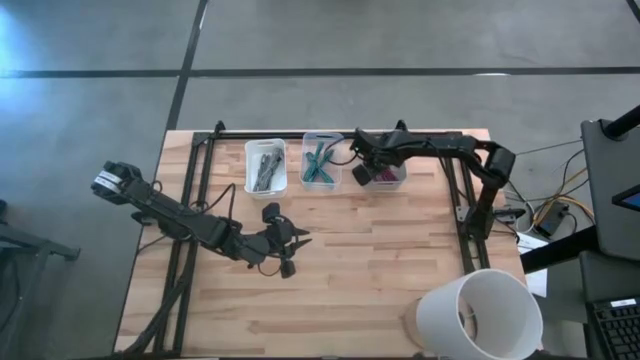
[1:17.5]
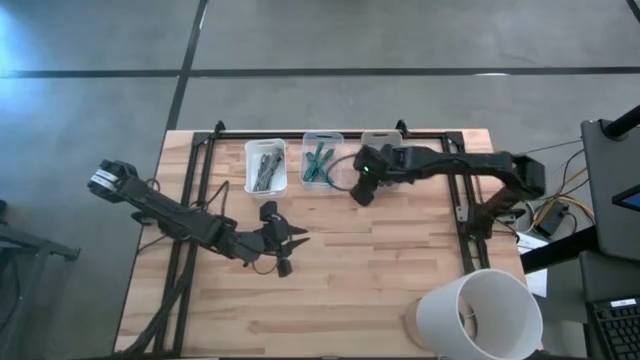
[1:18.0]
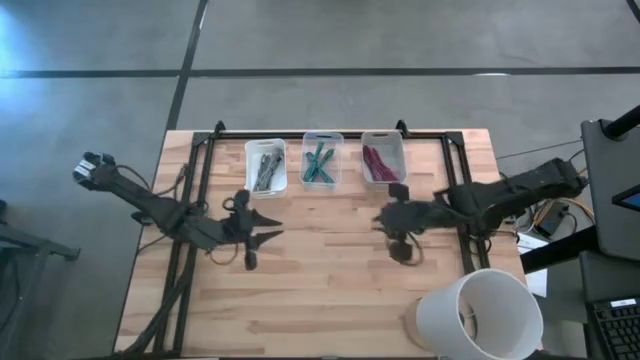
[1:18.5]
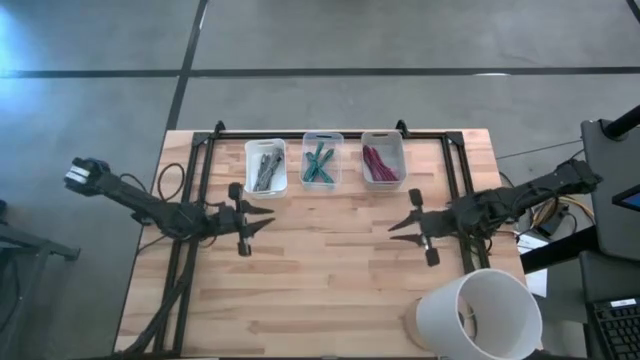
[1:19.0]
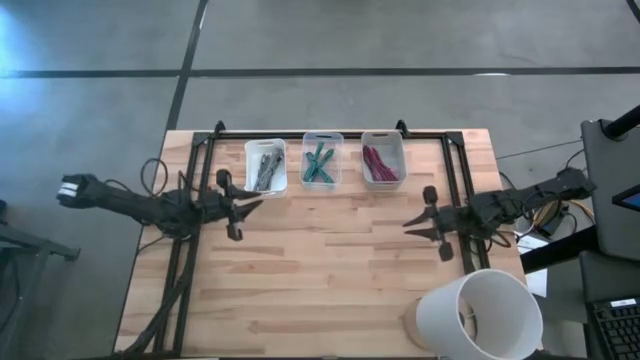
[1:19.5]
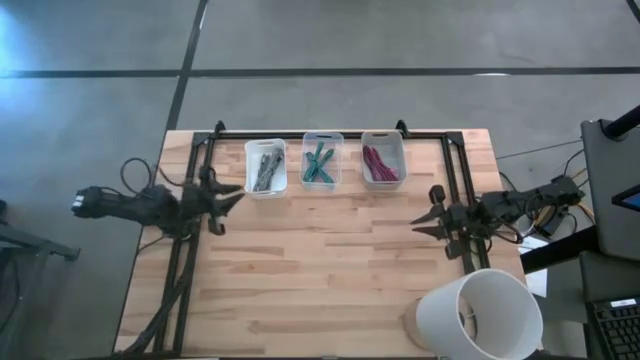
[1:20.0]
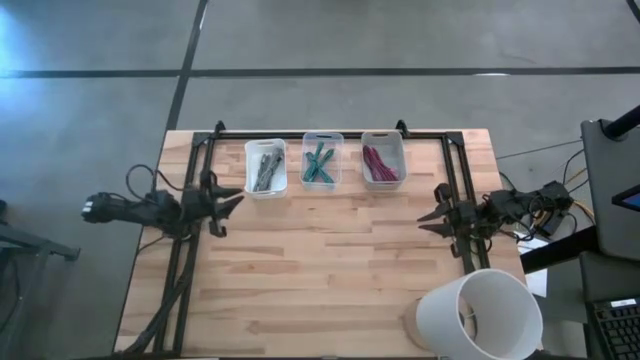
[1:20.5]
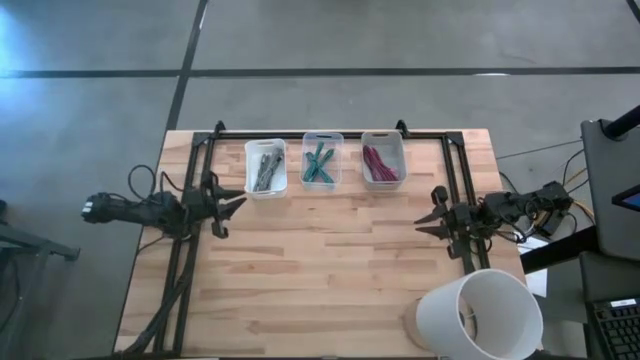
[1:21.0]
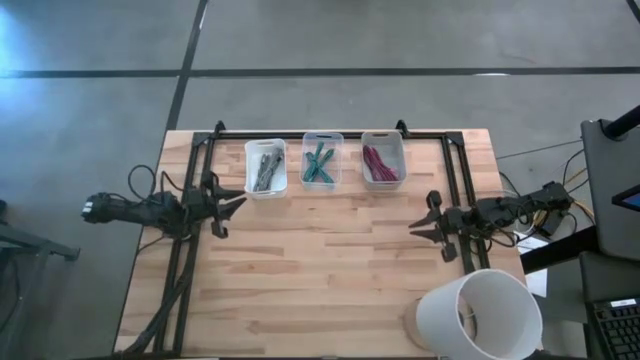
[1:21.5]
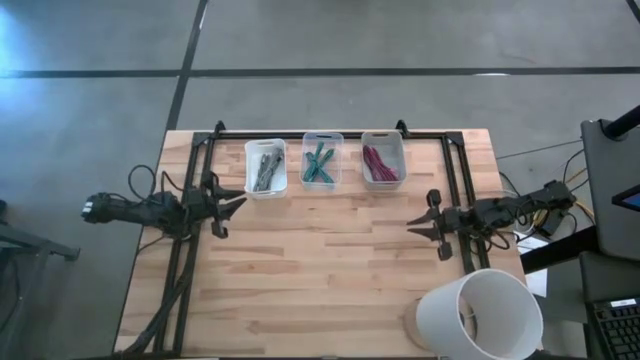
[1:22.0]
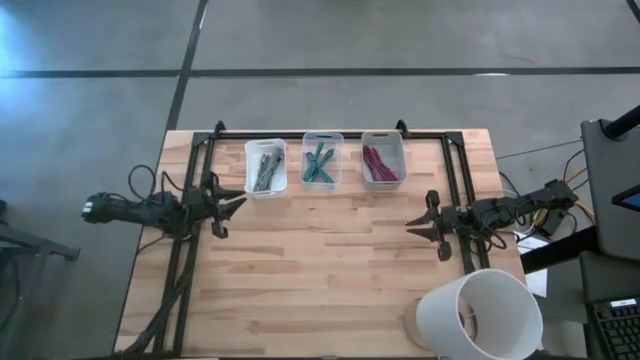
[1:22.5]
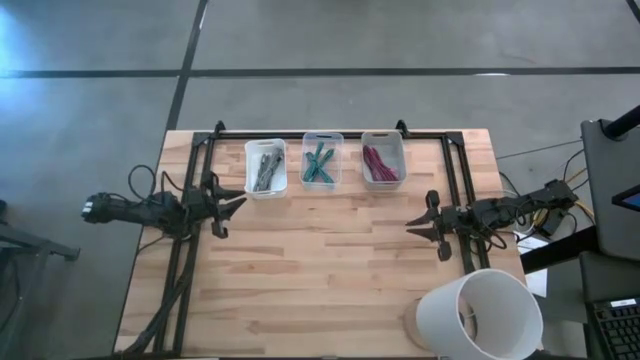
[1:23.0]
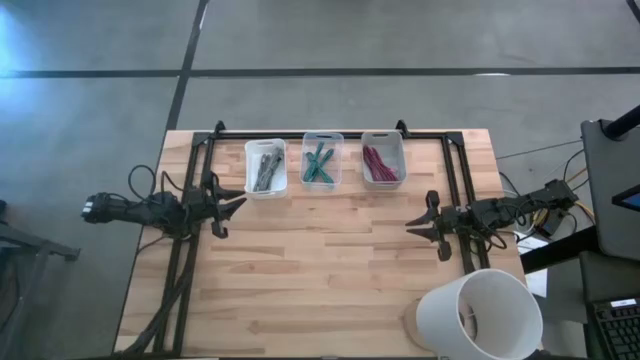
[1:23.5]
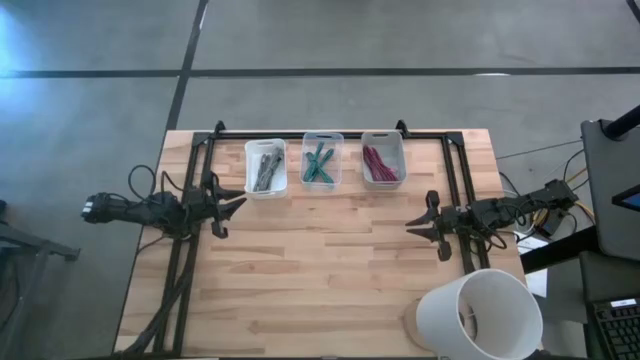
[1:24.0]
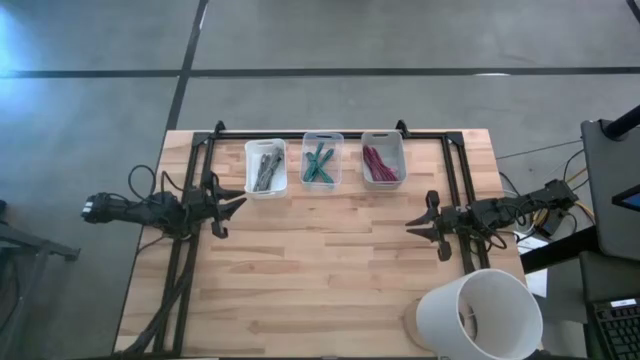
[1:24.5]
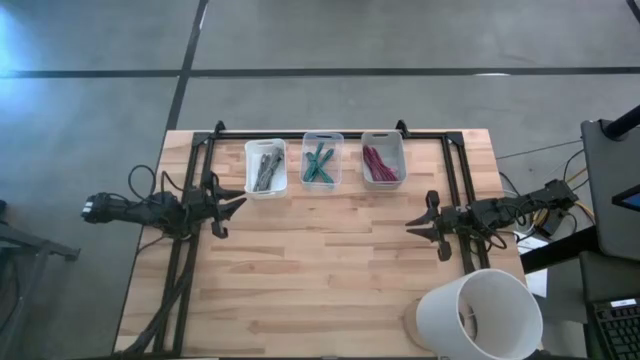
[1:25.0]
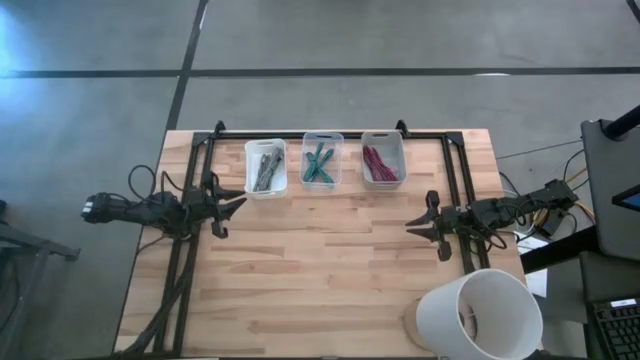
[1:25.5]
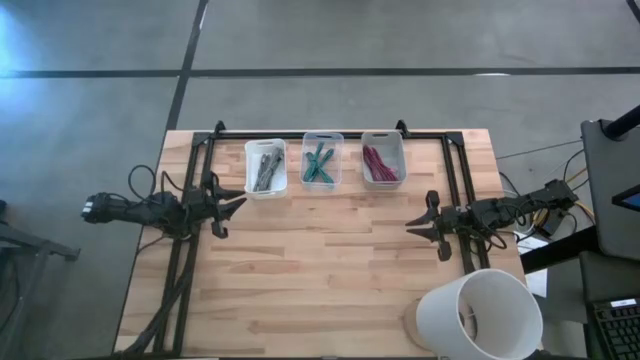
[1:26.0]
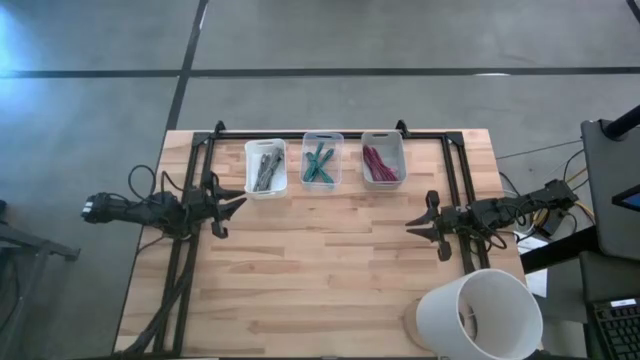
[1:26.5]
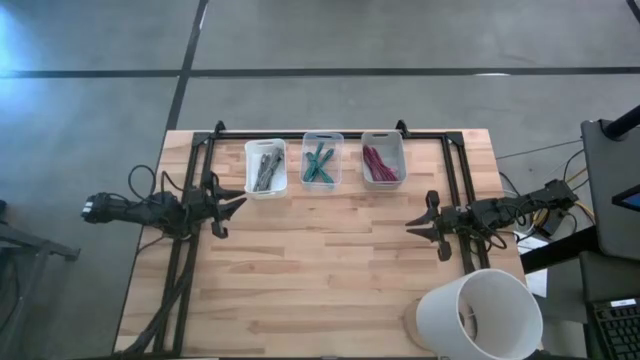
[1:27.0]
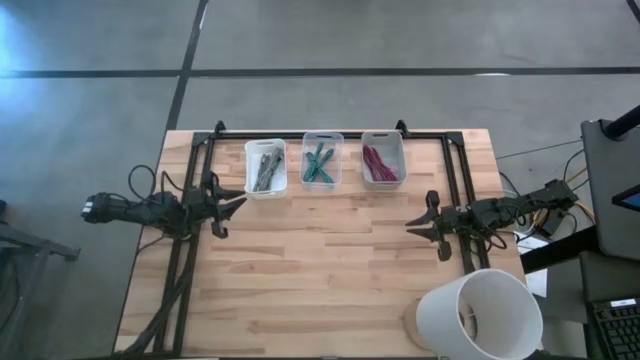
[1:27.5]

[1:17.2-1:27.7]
Task: Pick & Place USB Port
Return to Home Position

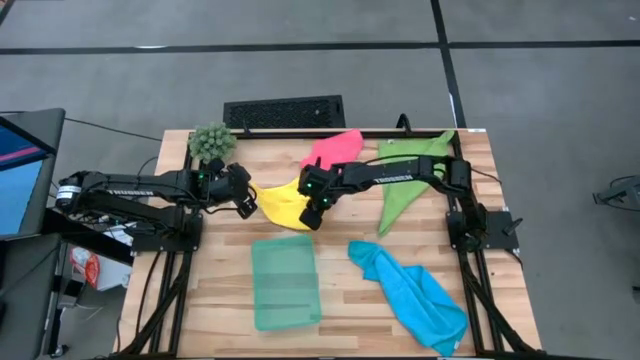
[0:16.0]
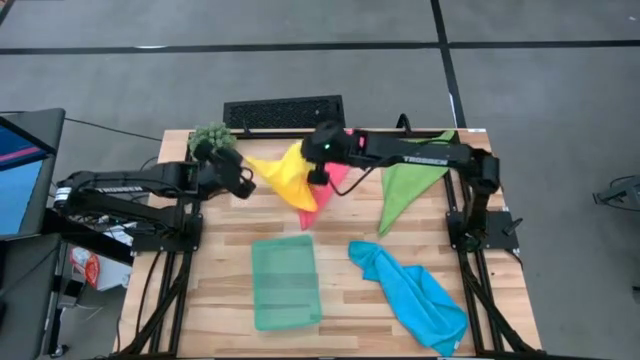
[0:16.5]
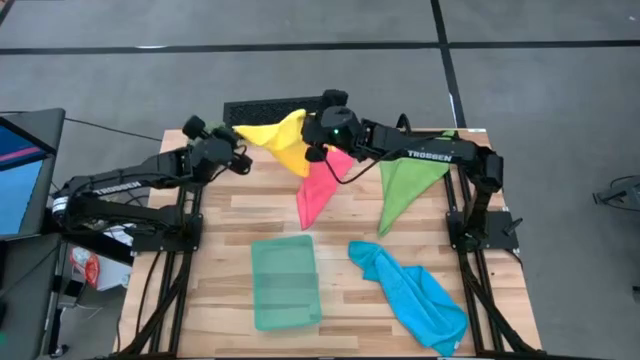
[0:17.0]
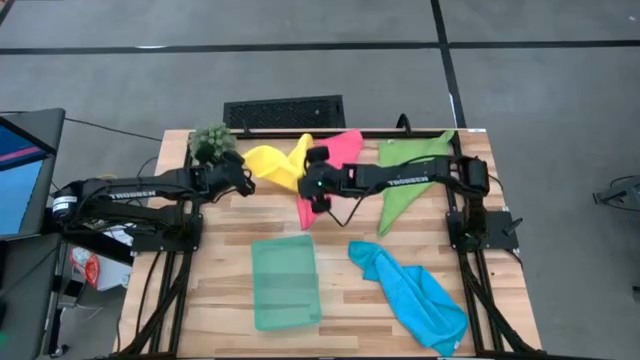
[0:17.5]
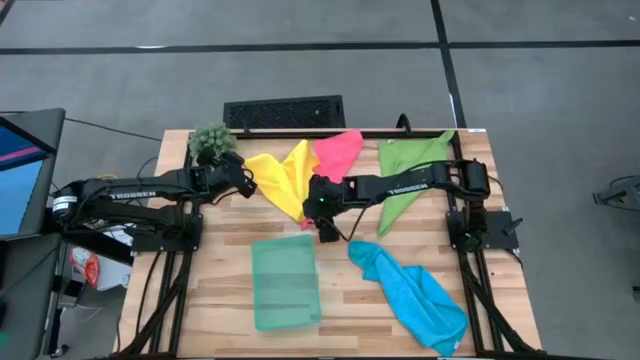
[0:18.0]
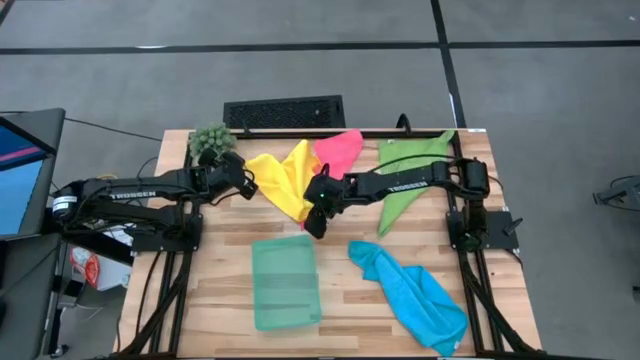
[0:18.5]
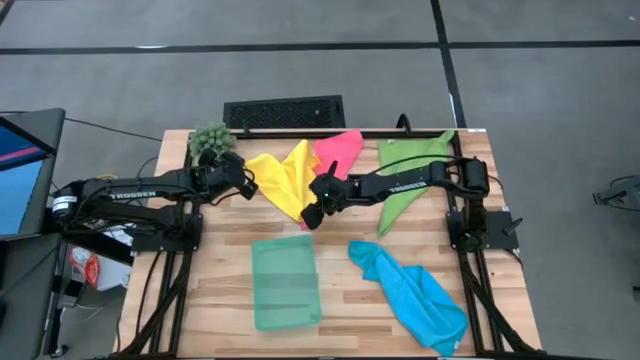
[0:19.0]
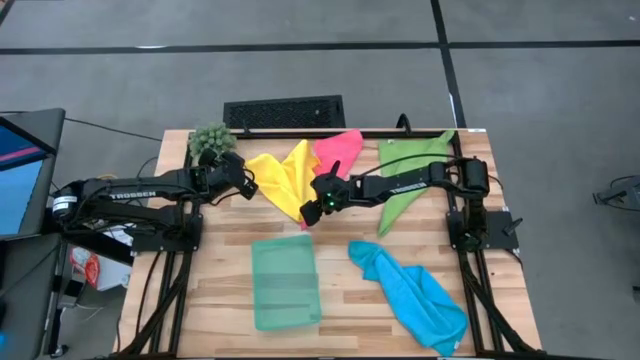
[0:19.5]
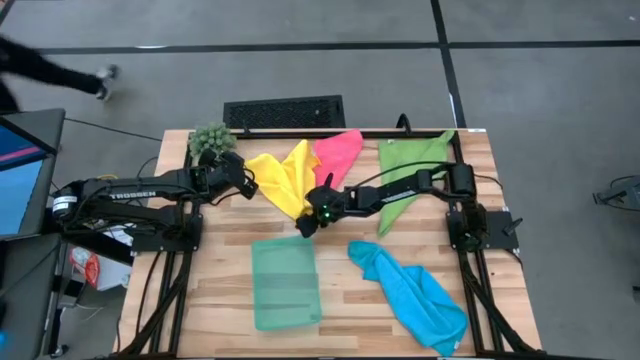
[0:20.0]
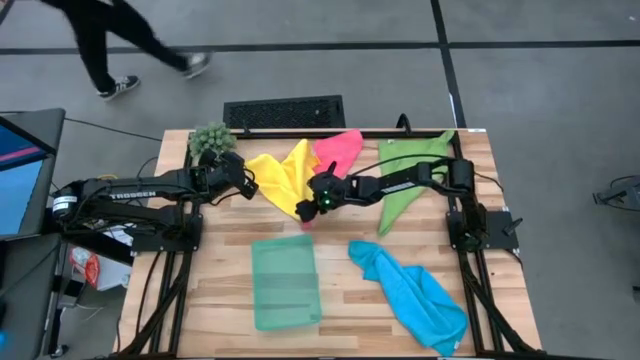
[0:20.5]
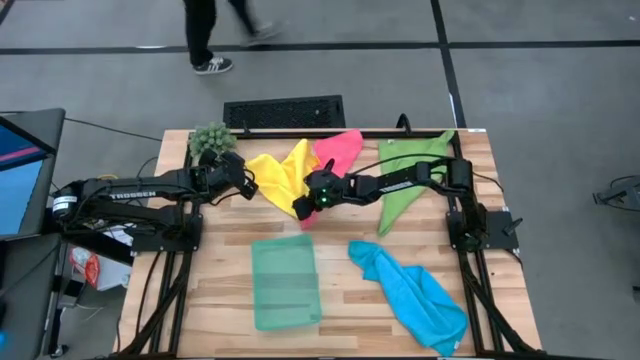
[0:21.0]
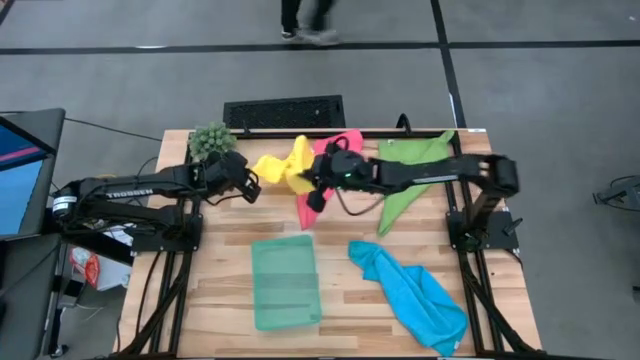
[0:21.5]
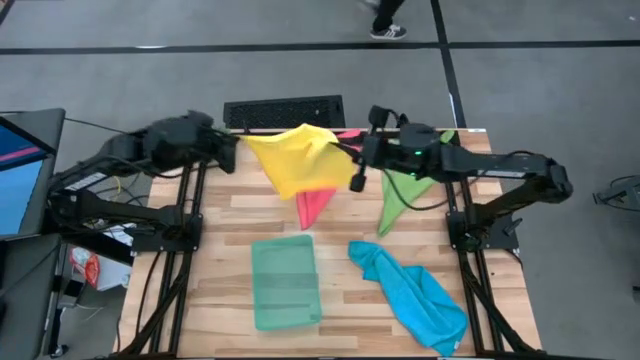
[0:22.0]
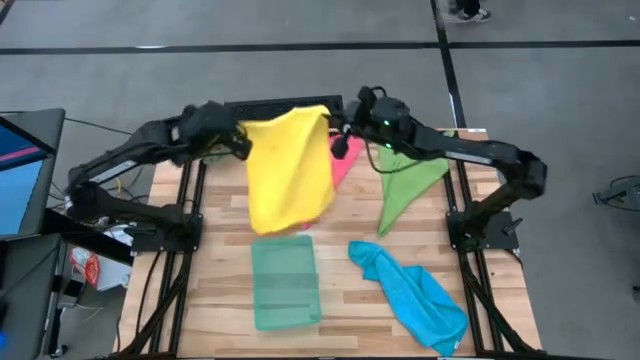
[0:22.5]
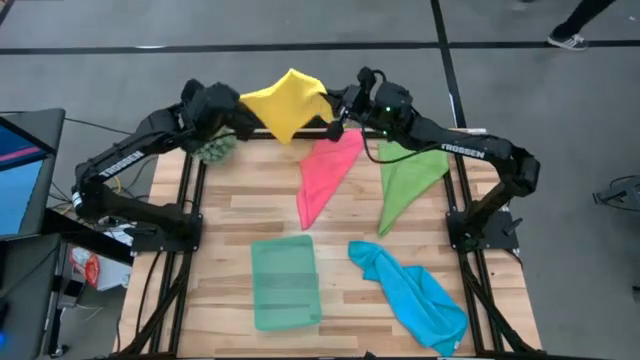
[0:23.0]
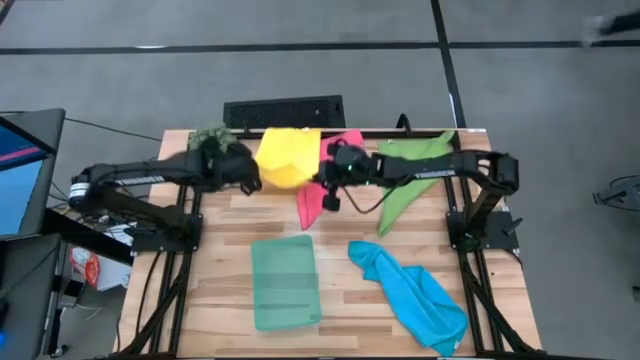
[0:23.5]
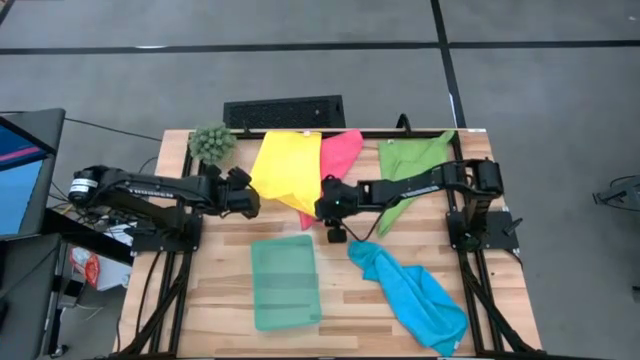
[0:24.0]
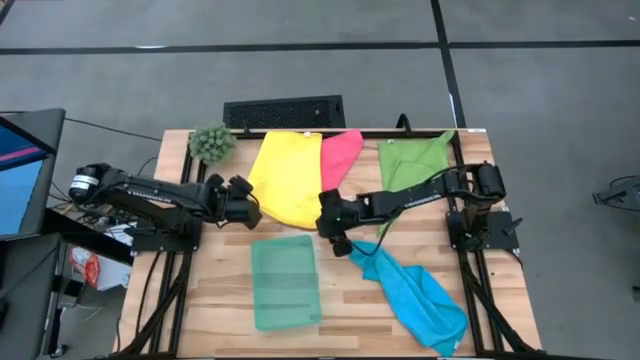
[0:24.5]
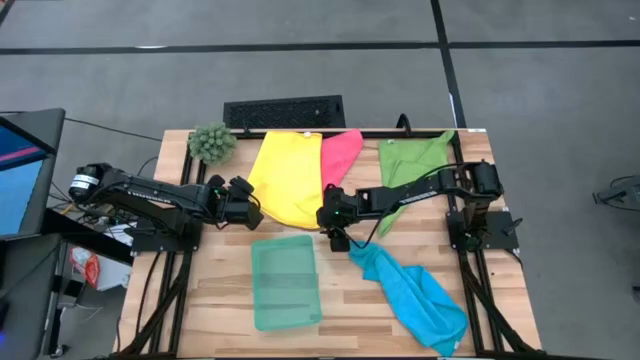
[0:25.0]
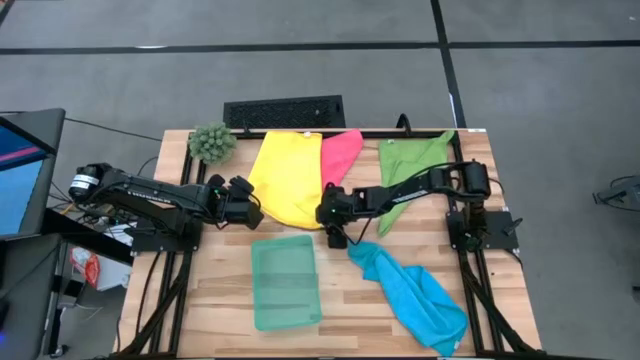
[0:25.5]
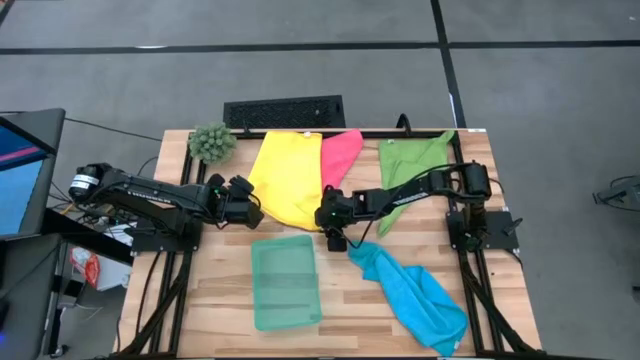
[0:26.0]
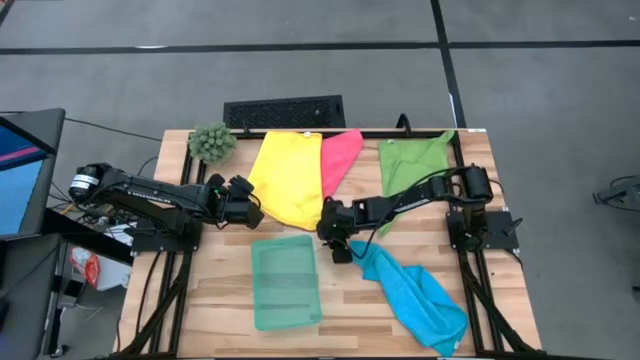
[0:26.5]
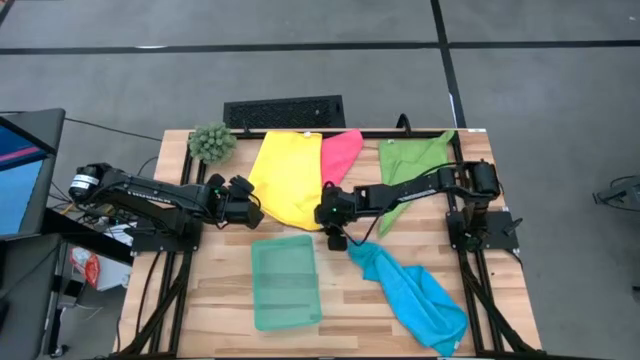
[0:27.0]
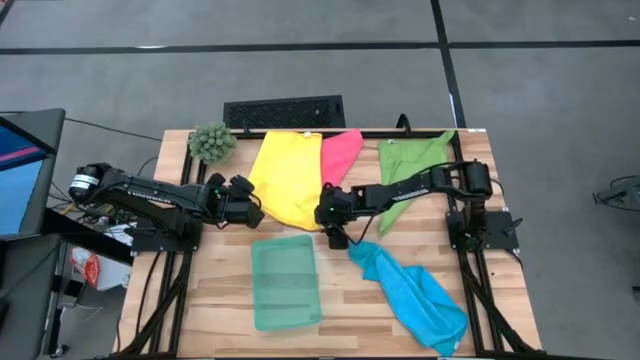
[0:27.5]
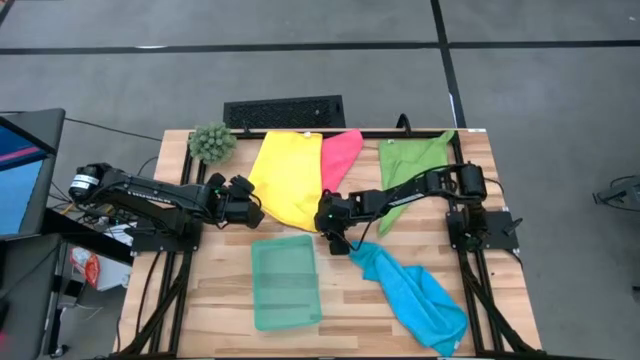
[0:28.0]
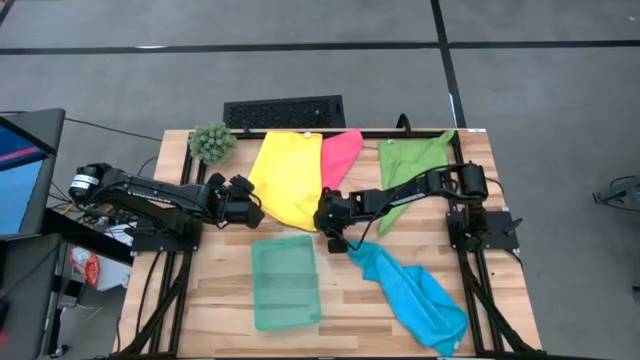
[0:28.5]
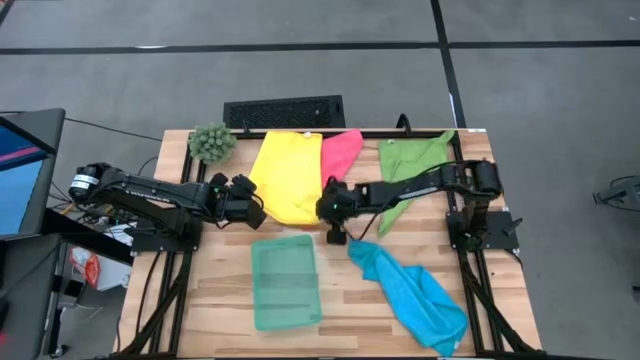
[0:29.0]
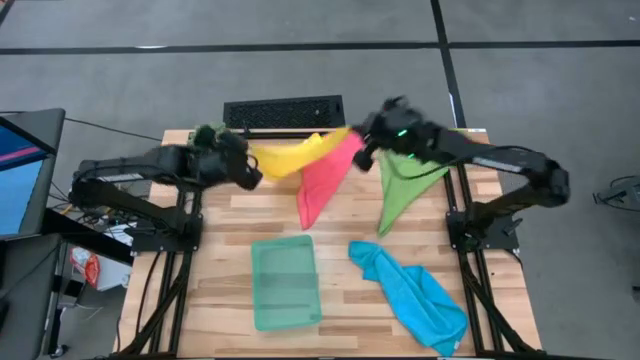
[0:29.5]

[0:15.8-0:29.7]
Task: Fold microfiber towels
Fold the yellow towel
